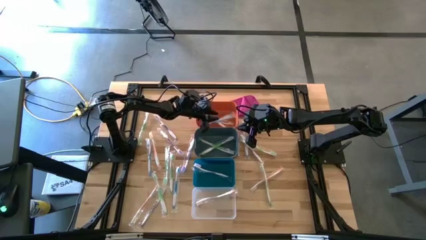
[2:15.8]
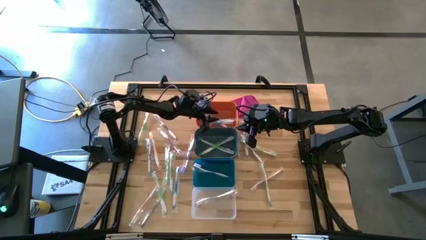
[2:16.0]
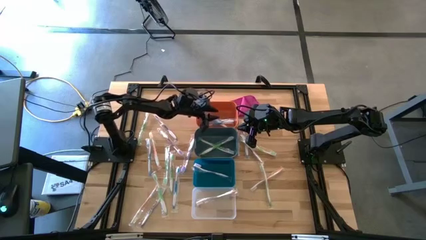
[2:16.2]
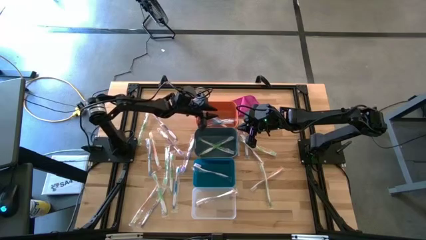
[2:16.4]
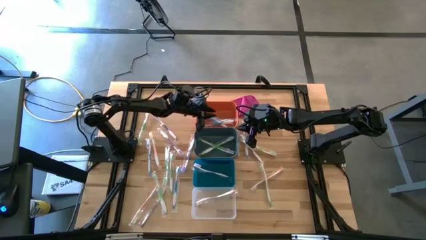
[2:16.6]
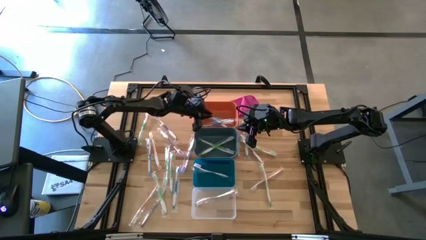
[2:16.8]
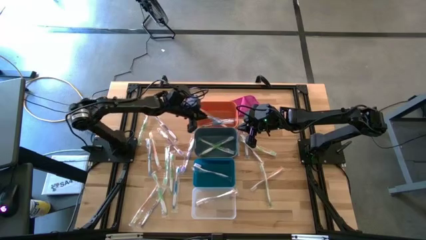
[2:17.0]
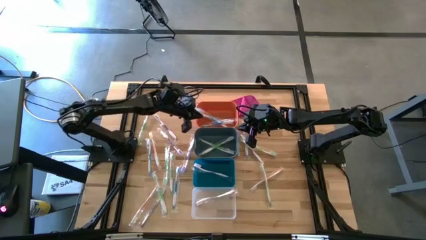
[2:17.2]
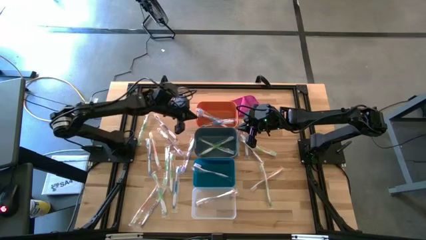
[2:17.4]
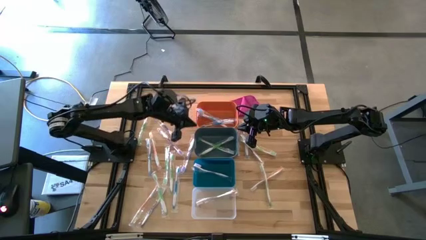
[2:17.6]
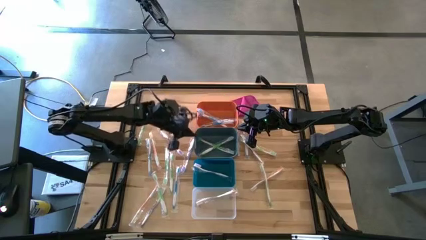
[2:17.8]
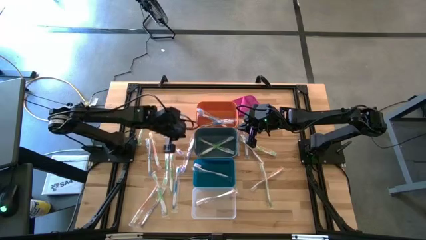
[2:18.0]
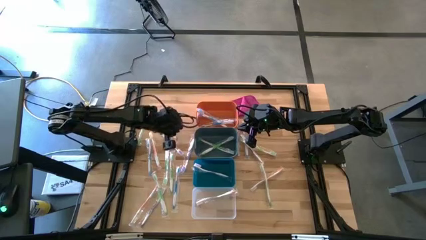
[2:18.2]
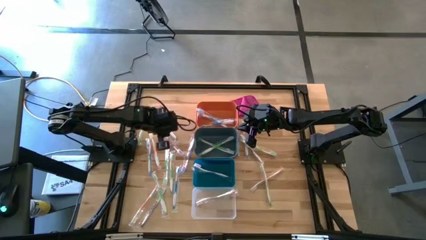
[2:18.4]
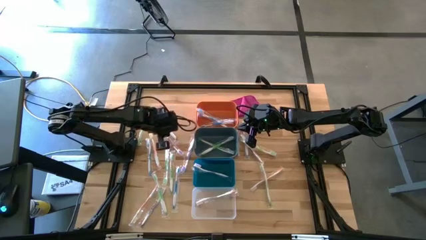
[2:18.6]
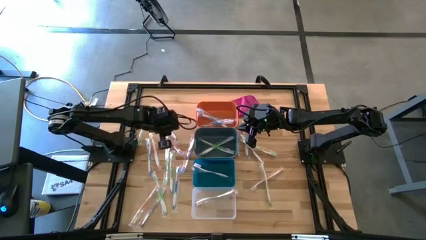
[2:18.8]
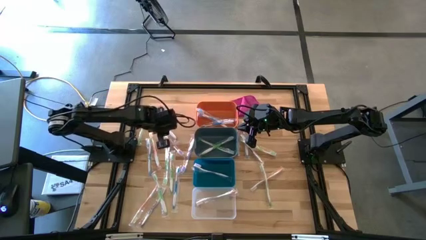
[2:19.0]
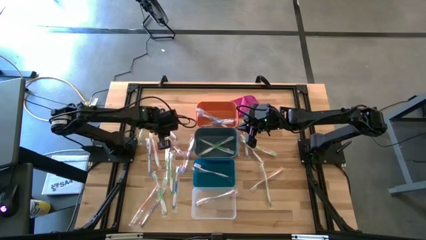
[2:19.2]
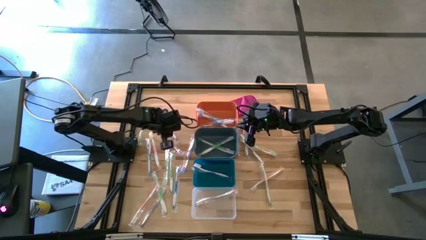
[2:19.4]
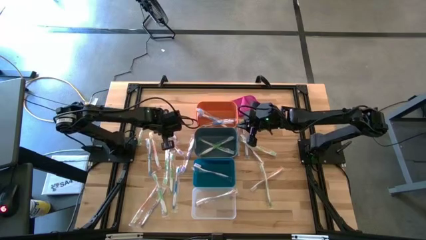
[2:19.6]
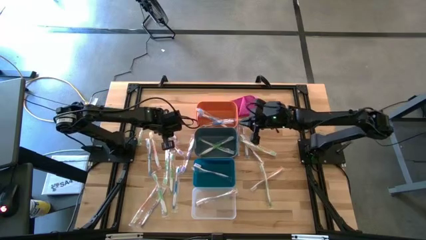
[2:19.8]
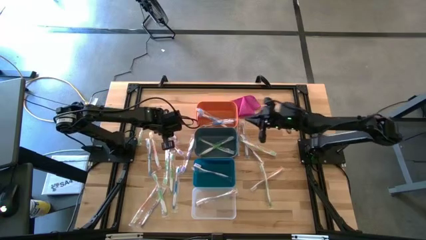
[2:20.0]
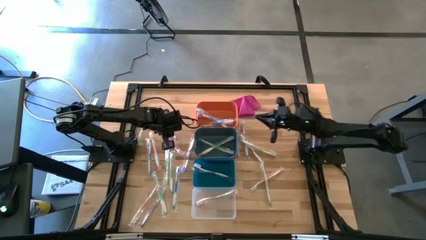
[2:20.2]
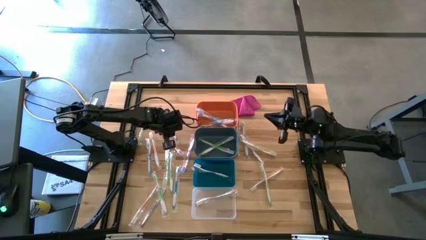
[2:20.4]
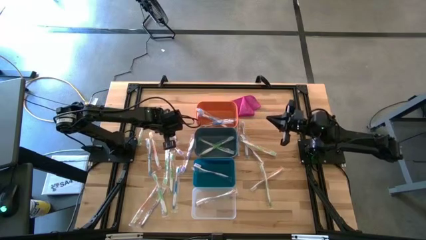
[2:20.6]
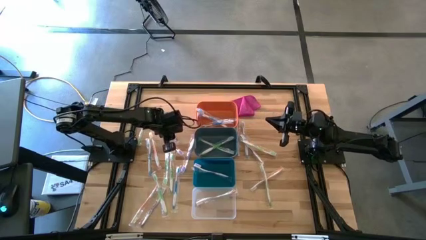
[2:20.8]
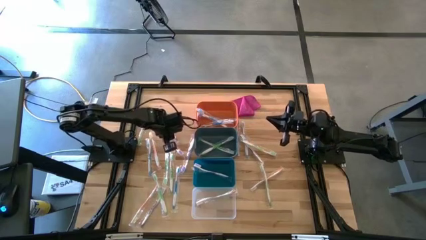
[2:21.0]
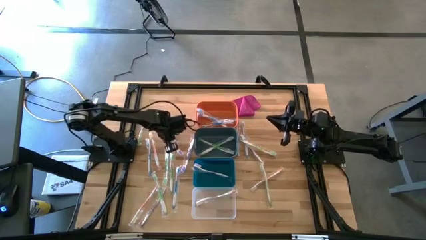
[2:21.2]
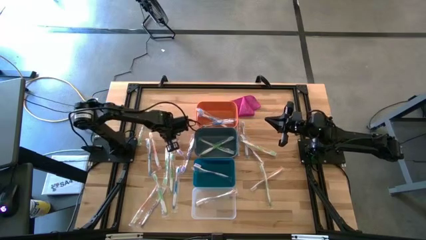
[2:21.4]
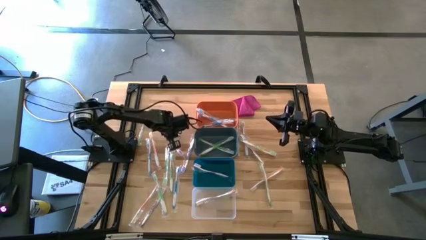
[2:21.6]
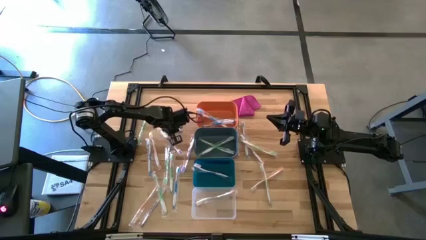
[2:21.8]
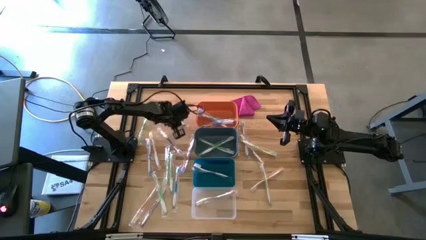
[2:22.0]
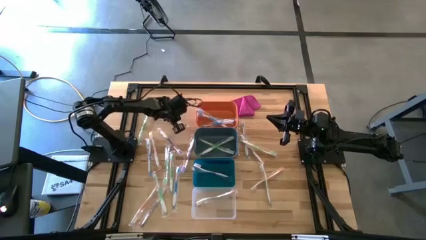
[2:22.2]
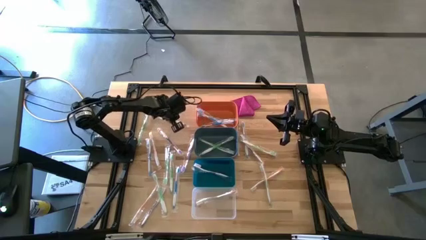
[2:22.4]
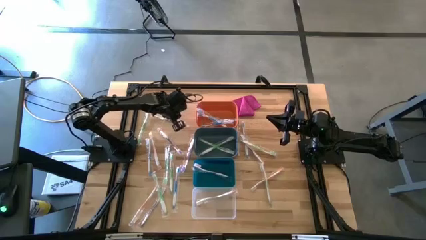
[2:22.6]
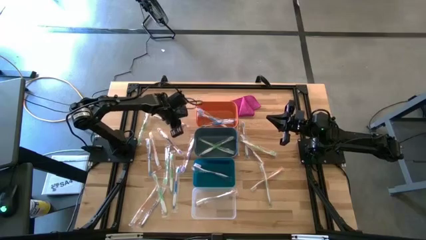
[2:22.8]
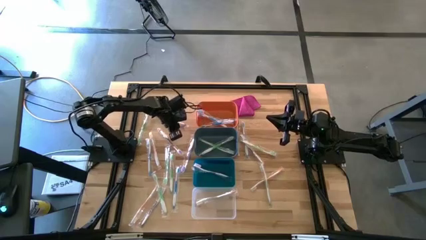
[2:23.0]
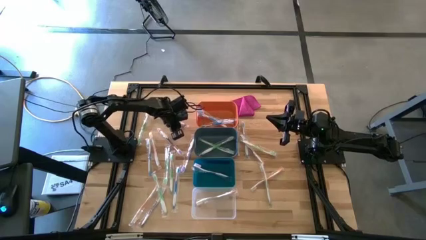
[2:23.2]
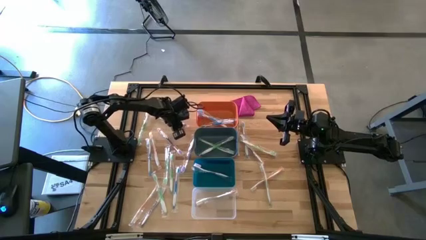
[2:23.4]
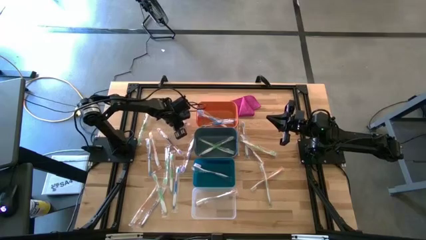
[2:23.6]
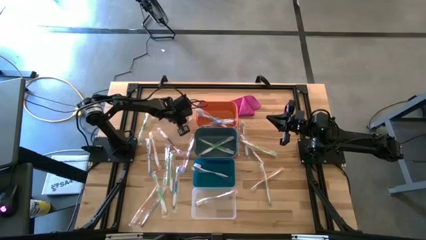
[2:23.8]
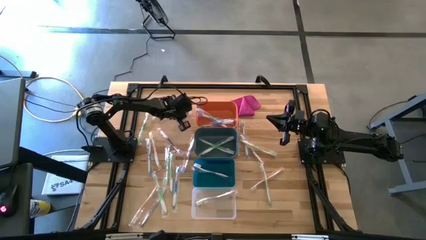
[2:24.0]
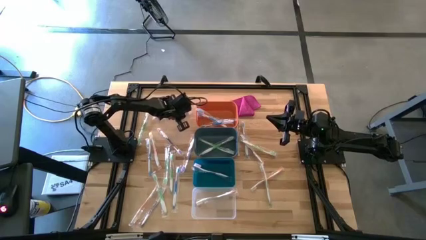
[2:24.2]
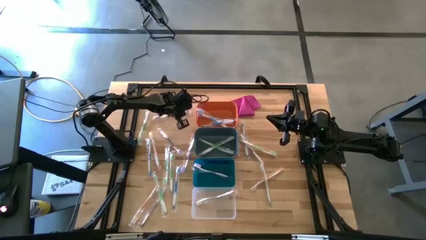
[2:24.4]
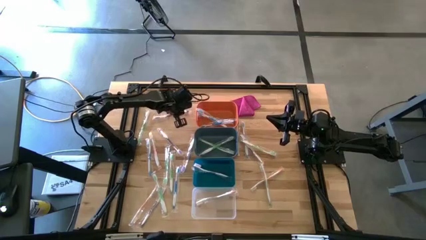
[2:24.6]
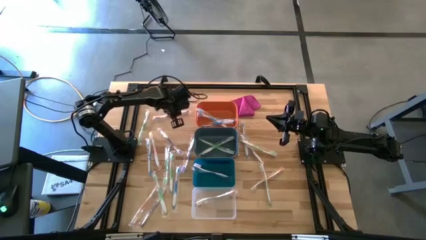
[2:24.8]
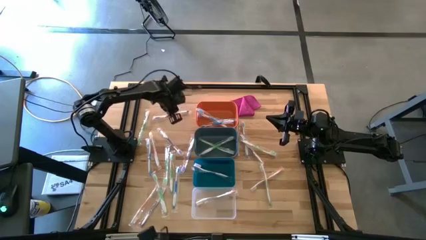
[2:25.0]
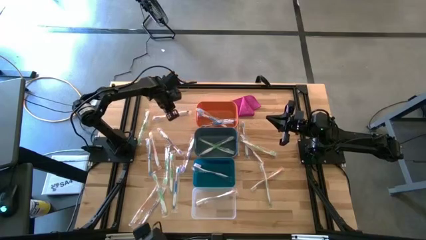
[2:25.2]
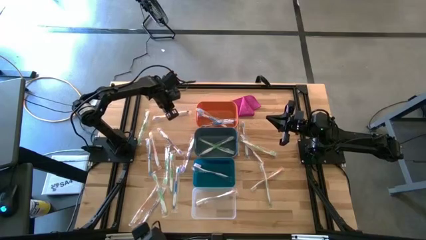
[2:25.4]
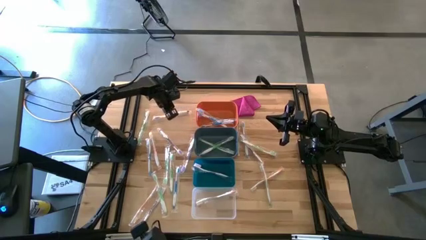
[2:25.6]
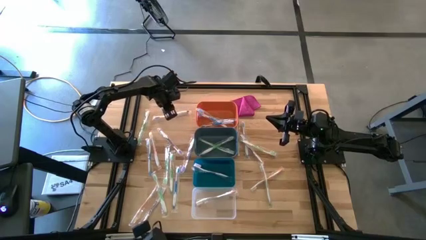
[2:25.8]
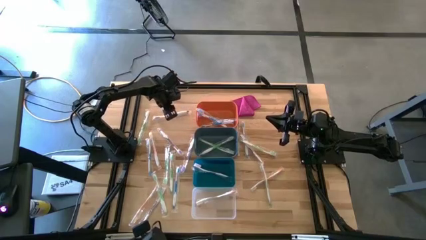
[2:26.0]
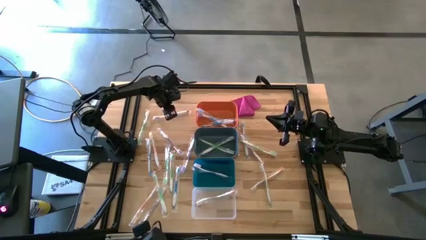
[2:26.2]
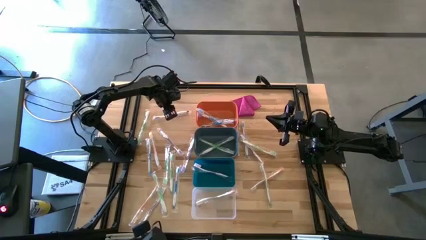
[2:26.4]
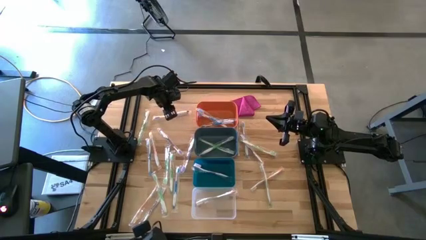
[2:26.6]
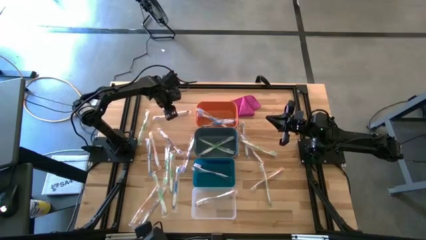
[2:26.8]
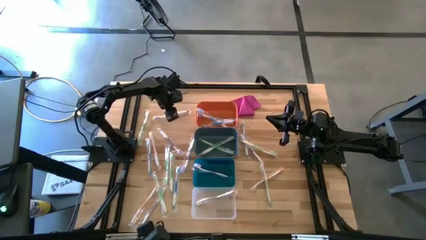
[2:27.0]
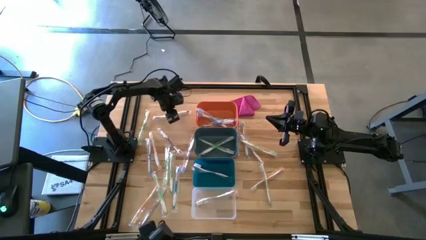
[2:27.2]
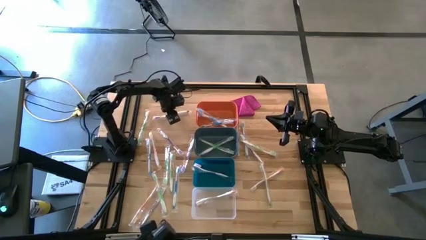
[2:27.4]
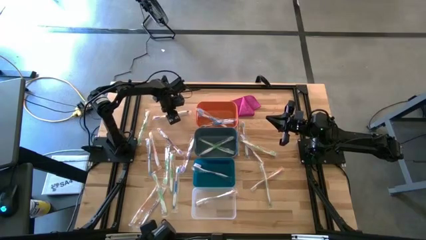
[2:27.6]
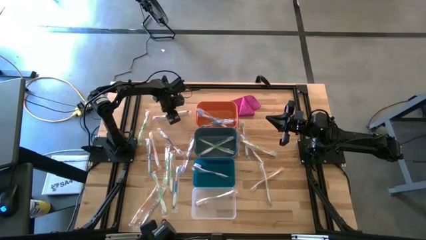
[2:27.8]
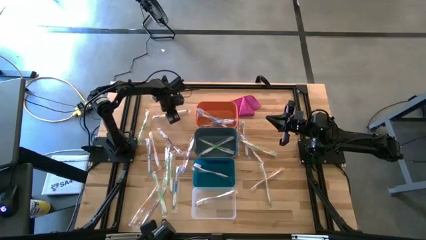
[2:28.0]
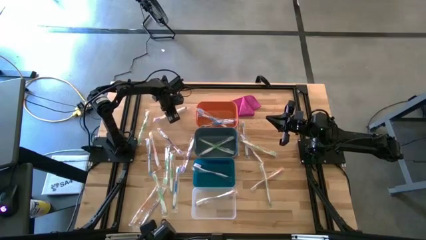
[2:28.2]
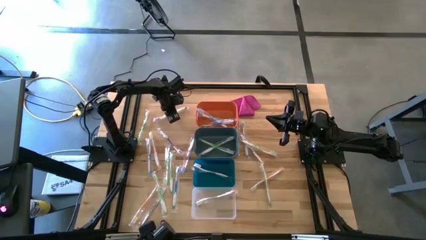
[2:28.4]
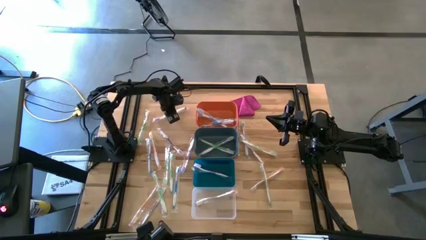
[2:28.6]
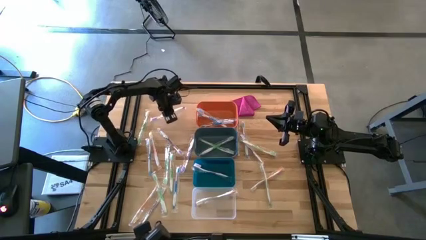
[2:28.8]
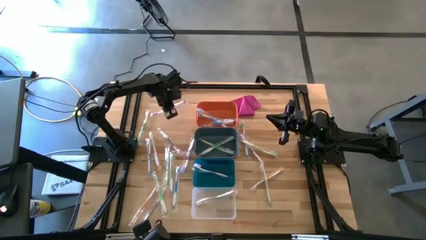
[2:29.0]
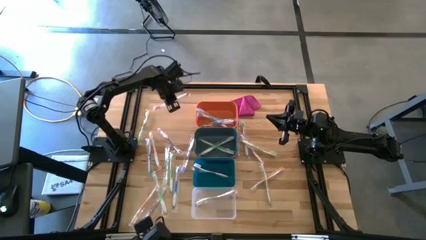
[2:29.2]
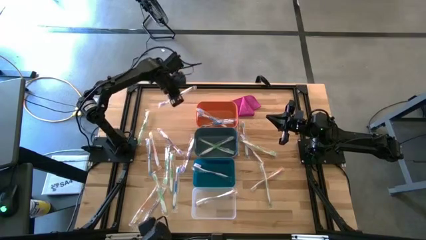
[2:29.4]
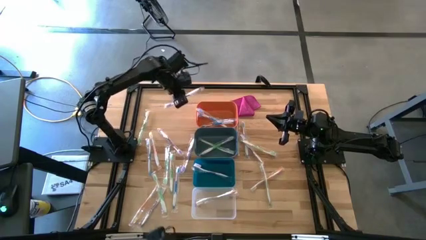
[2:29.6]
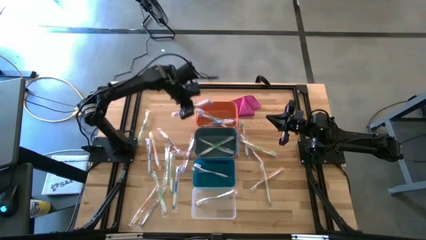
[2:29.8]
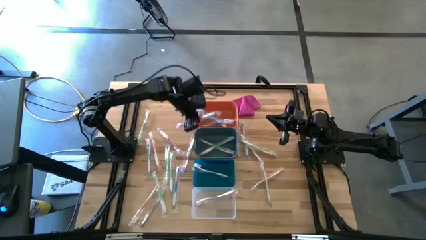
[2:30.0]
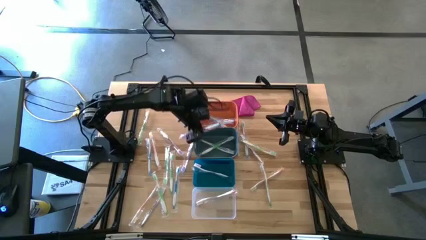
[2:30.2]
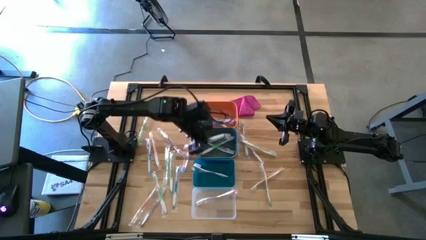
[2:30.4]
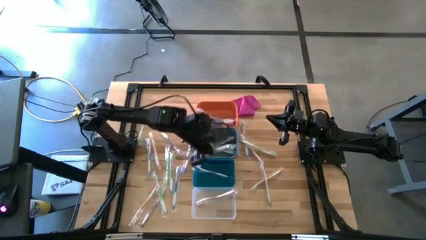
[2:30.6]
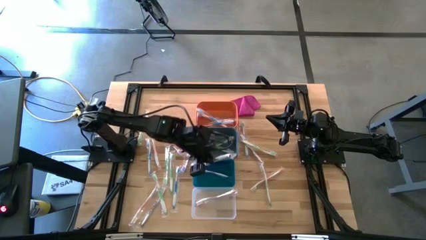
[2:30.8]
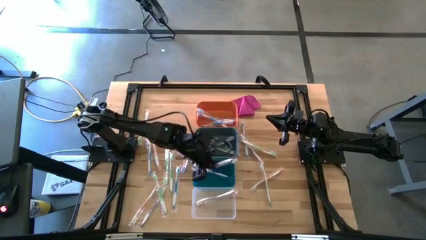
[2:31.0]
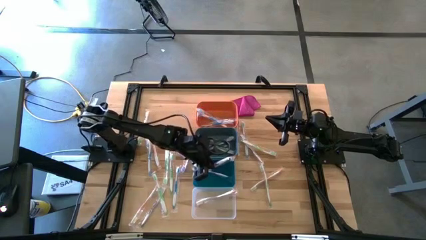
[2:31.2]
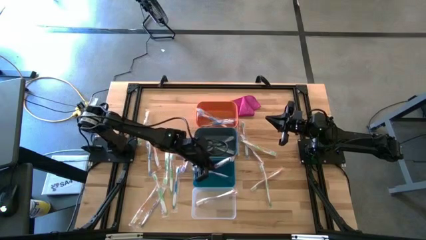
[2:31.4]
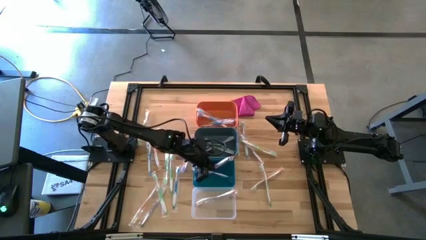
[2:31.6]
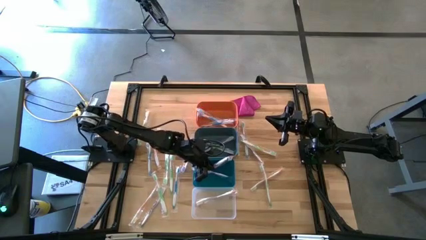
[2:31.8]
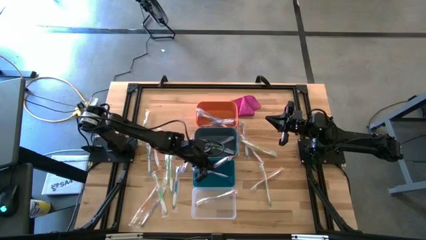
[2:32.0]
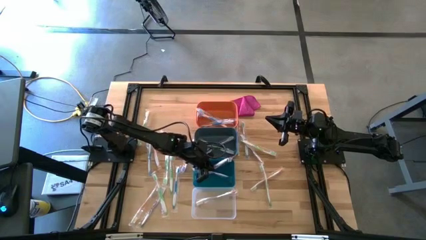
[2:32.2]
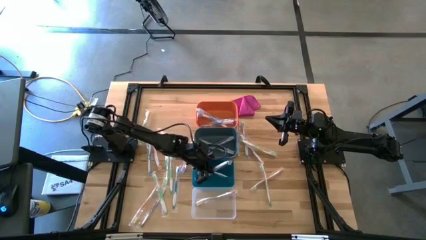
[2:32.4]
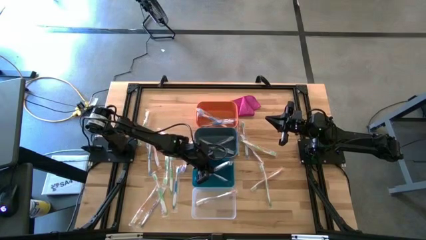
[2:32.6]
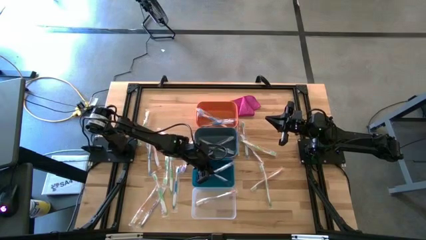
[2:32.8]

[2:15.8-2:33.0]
Task: Pick & Place Toothbrushes
Put the purple toothbrush into the blue bin
